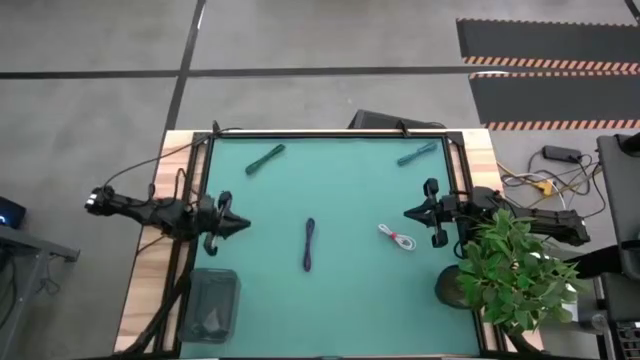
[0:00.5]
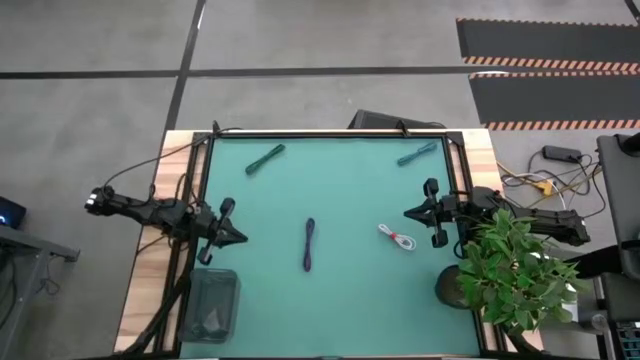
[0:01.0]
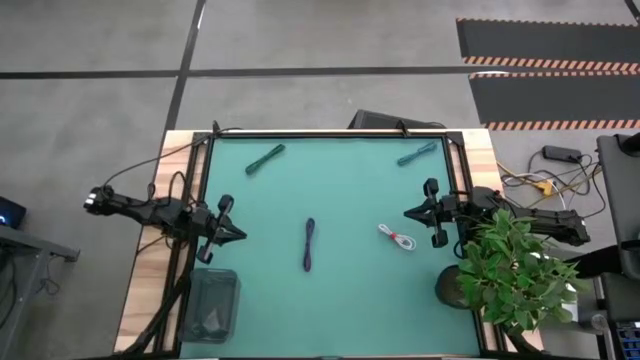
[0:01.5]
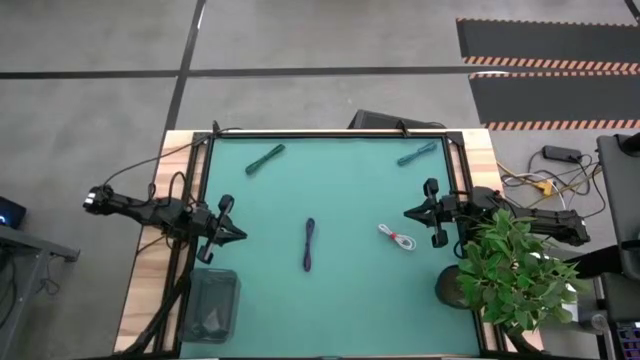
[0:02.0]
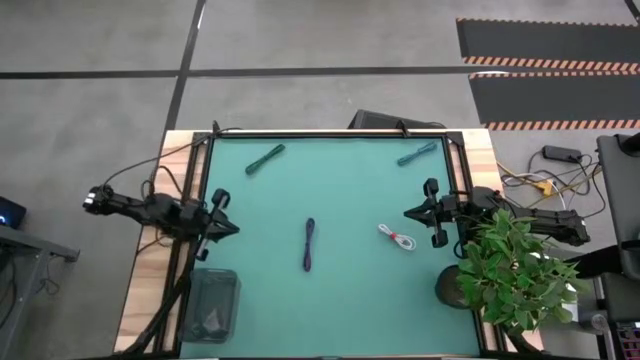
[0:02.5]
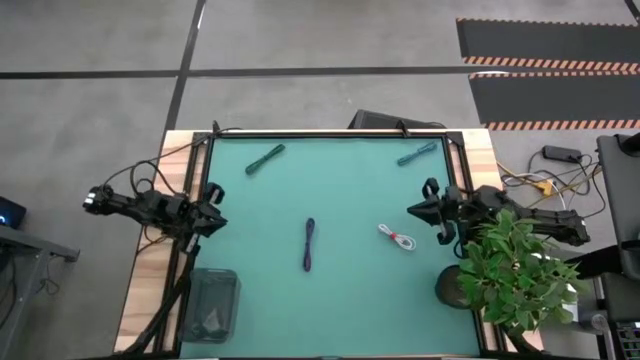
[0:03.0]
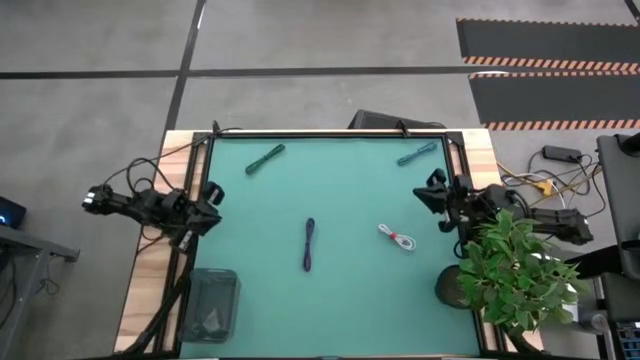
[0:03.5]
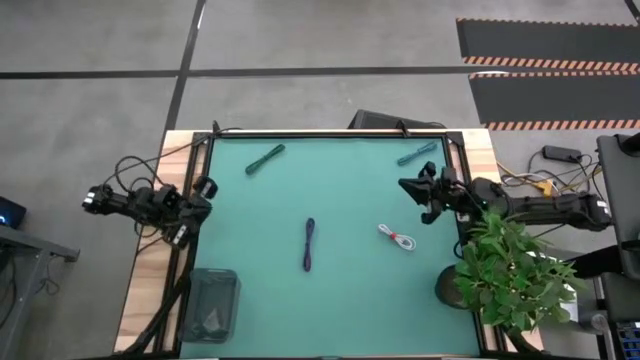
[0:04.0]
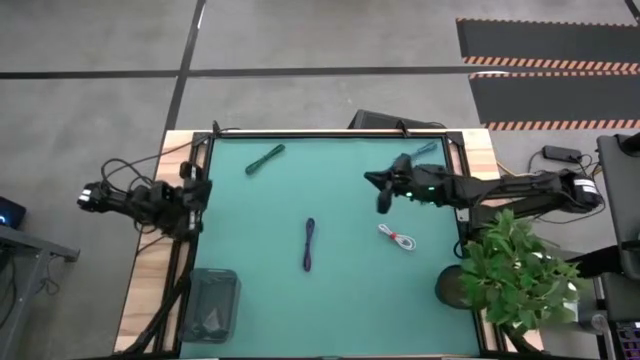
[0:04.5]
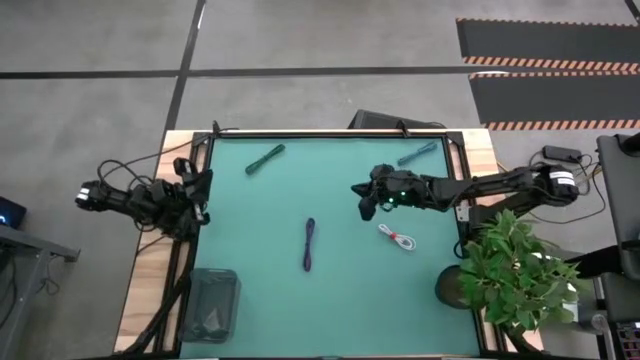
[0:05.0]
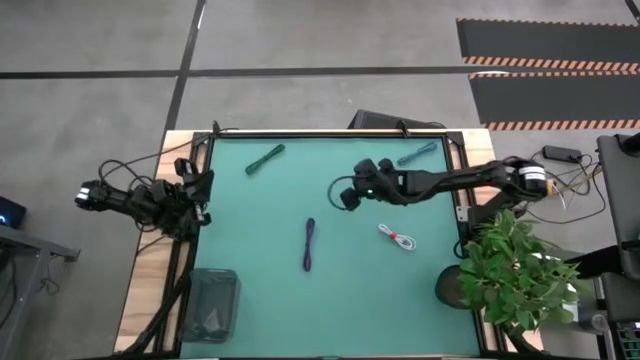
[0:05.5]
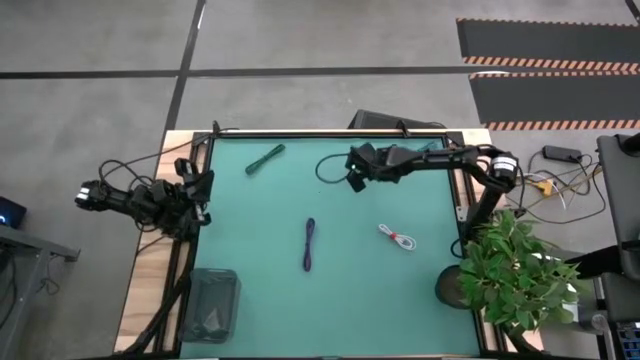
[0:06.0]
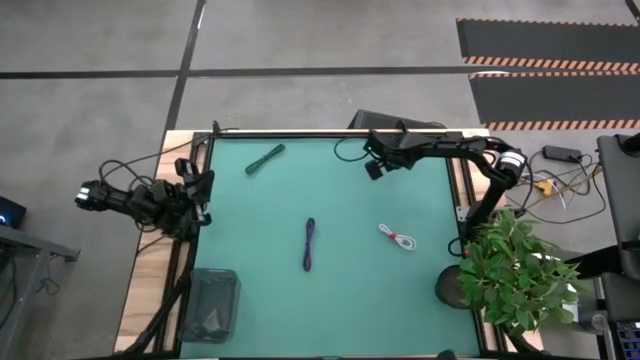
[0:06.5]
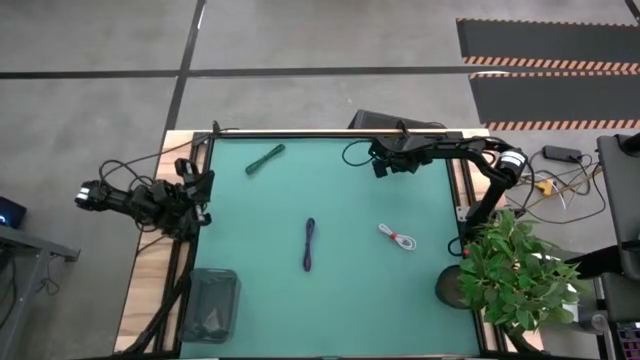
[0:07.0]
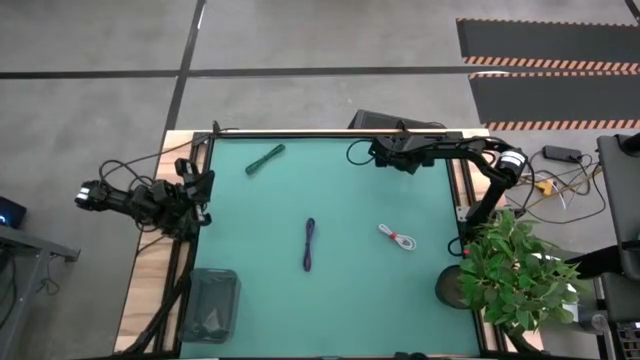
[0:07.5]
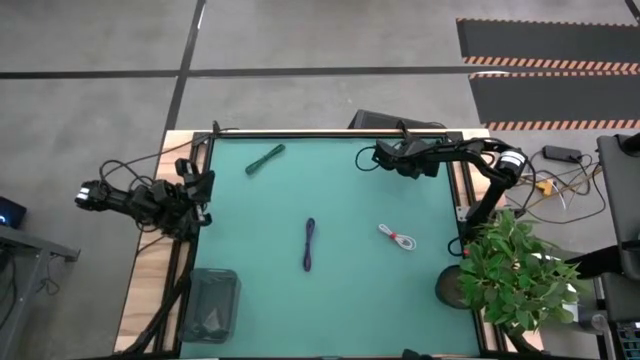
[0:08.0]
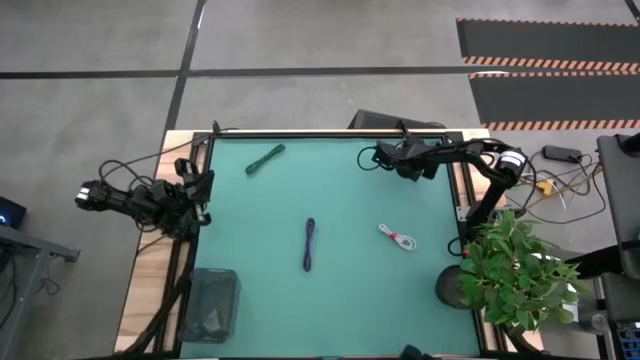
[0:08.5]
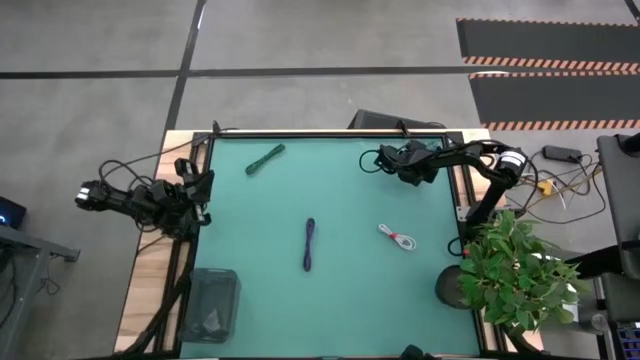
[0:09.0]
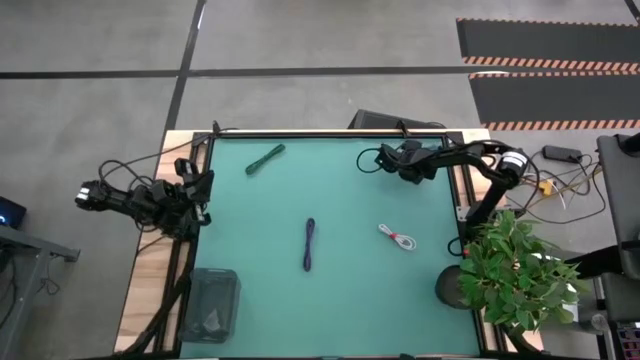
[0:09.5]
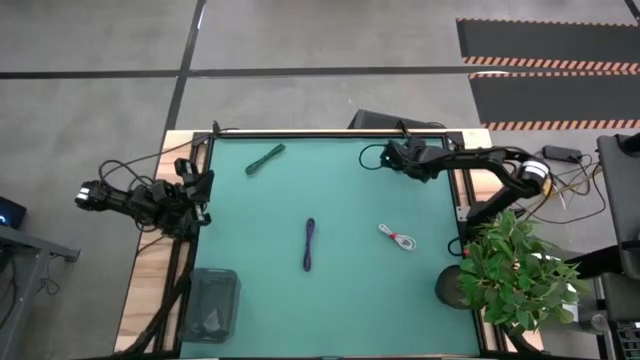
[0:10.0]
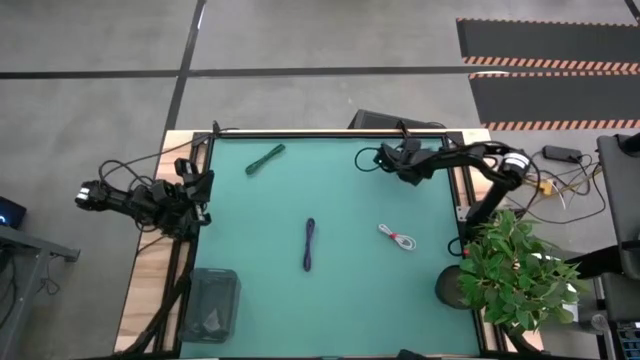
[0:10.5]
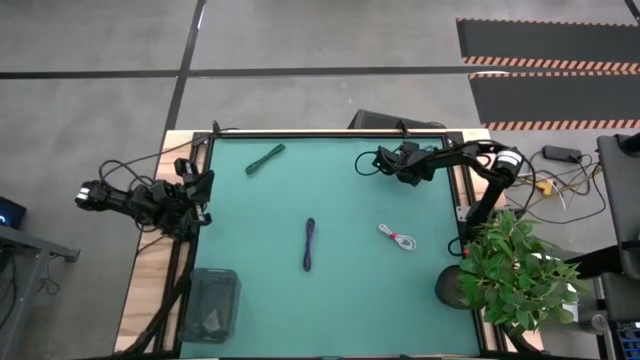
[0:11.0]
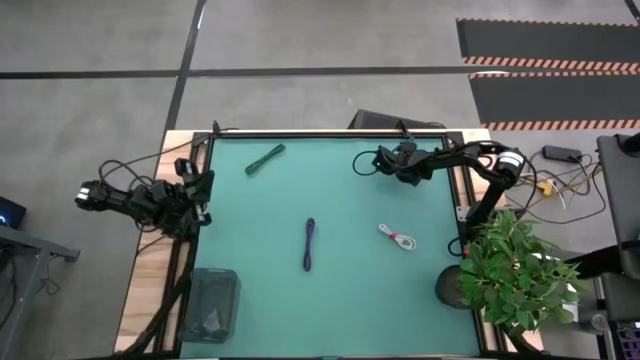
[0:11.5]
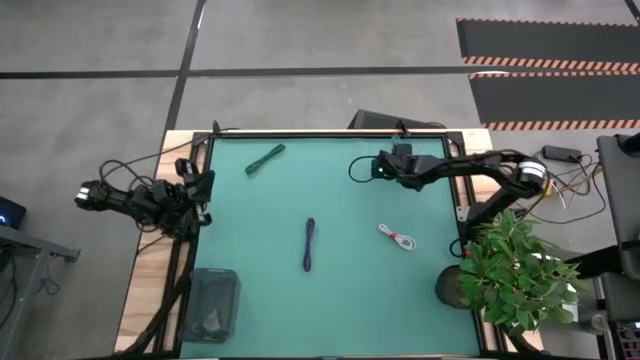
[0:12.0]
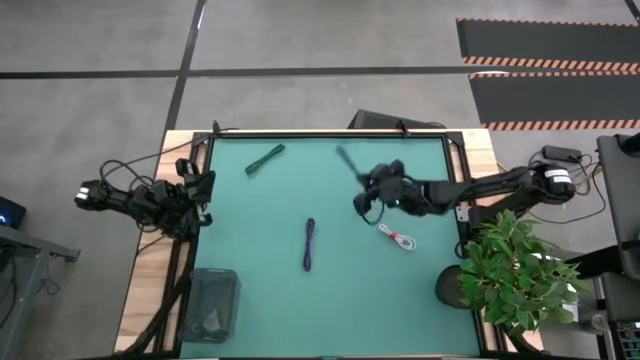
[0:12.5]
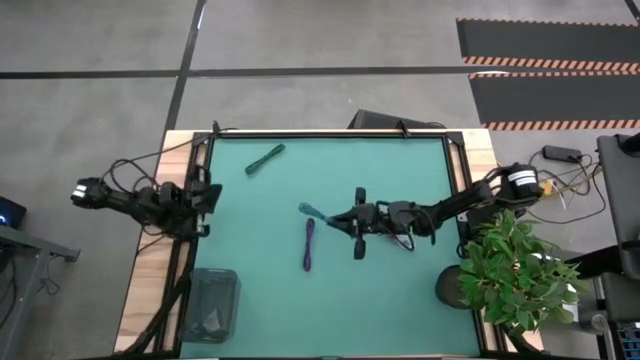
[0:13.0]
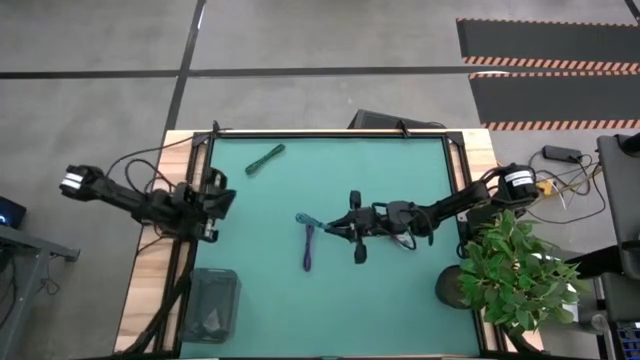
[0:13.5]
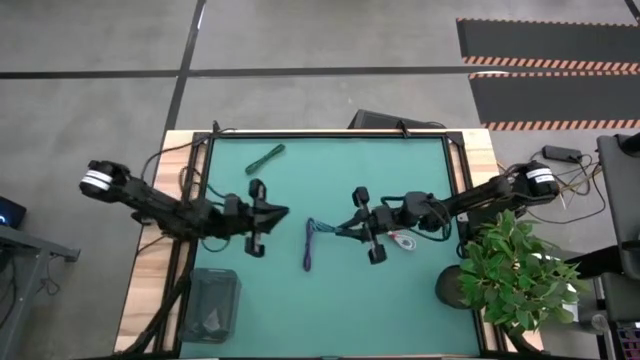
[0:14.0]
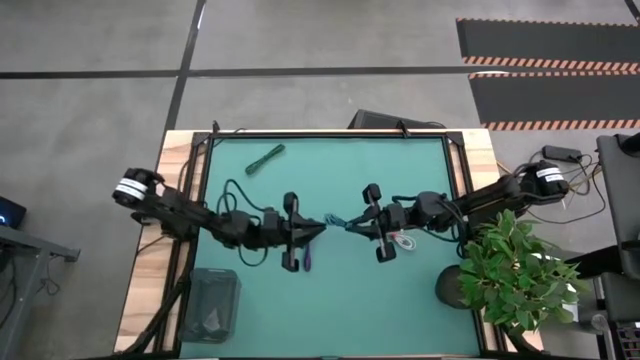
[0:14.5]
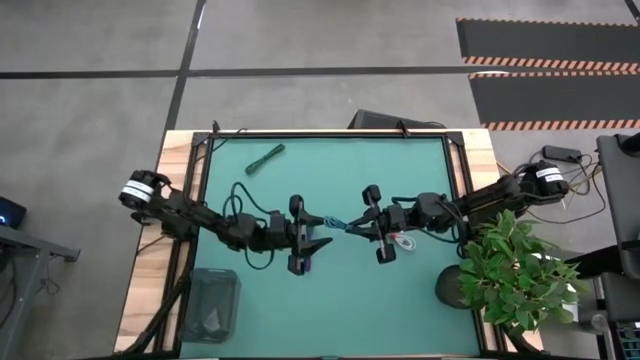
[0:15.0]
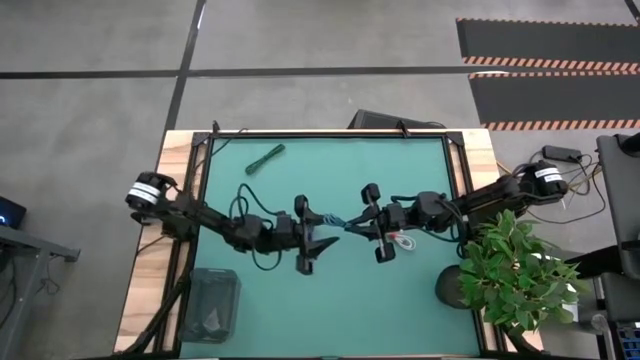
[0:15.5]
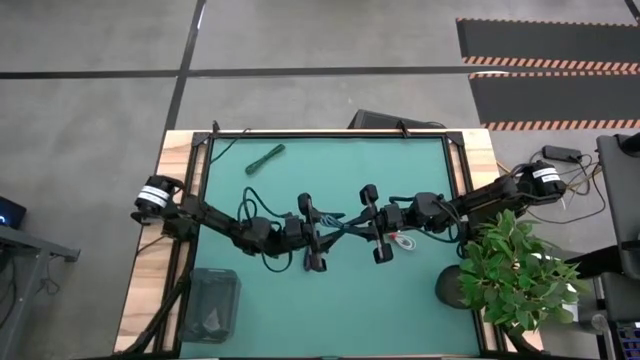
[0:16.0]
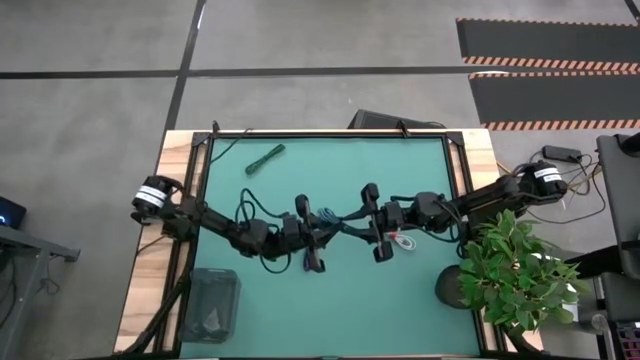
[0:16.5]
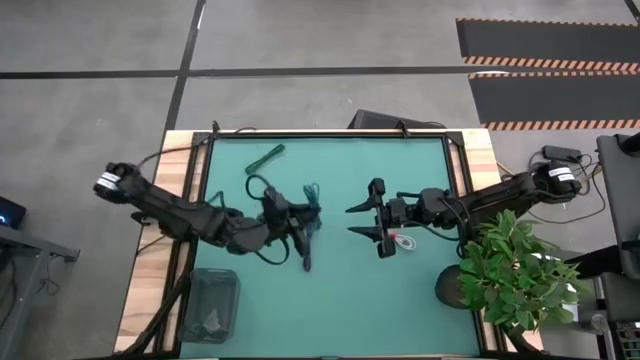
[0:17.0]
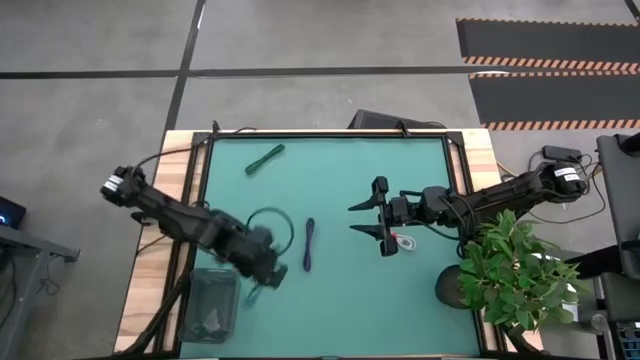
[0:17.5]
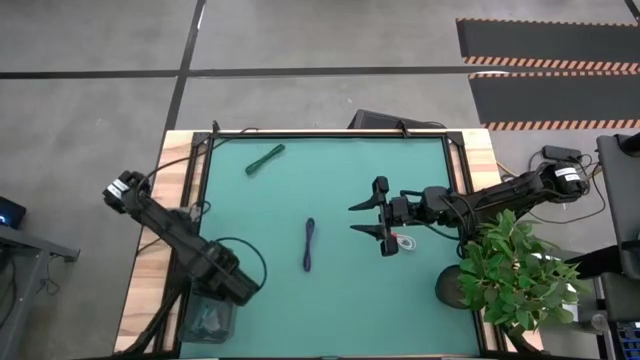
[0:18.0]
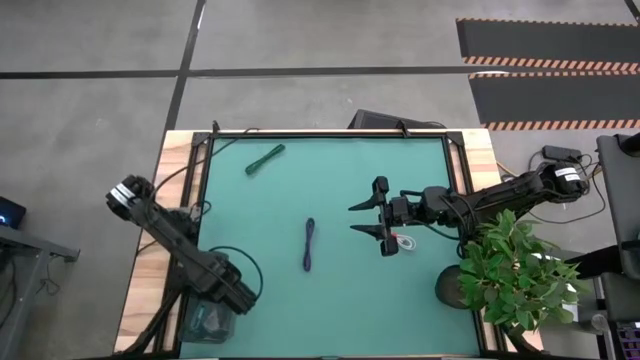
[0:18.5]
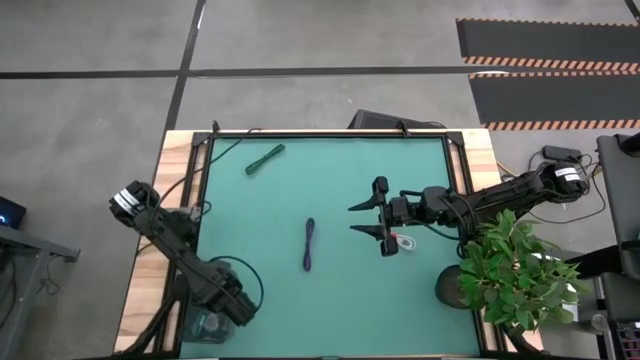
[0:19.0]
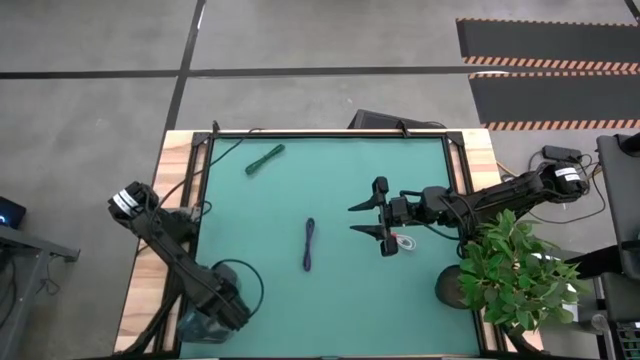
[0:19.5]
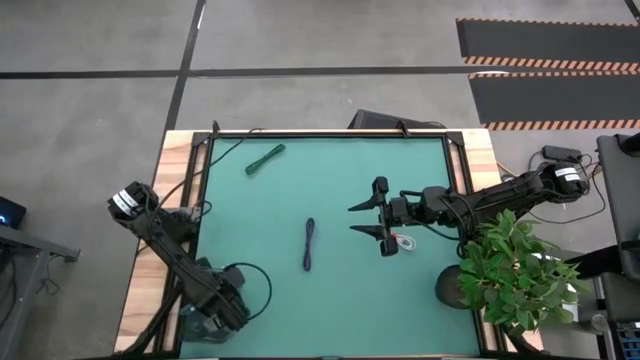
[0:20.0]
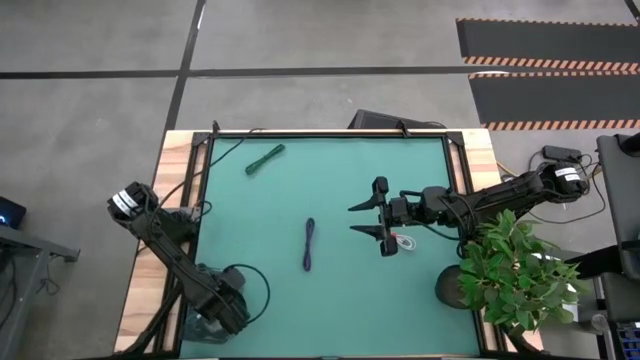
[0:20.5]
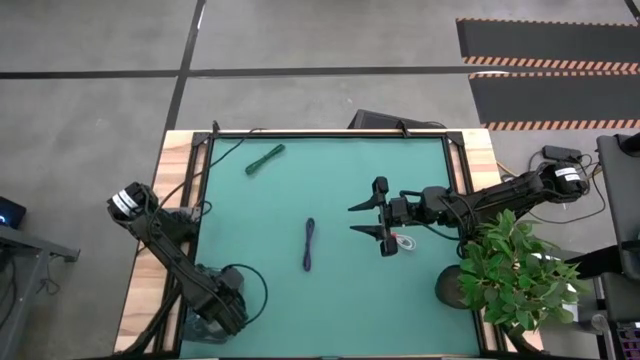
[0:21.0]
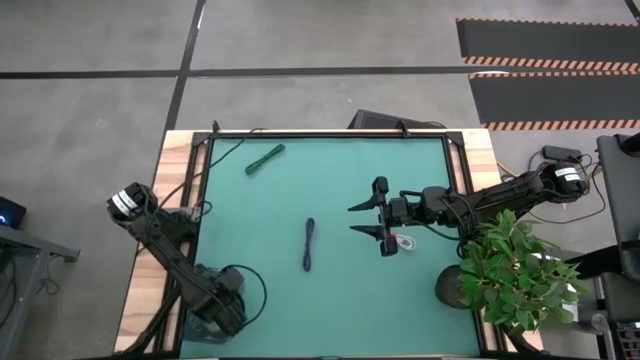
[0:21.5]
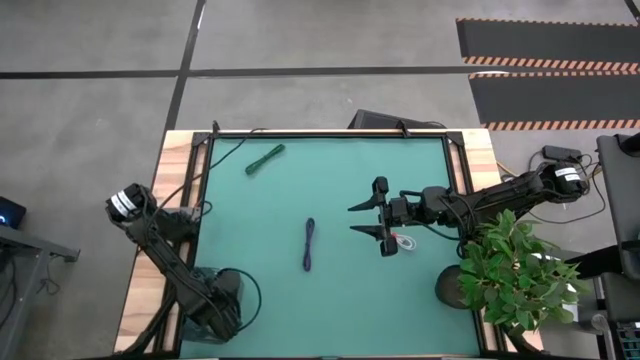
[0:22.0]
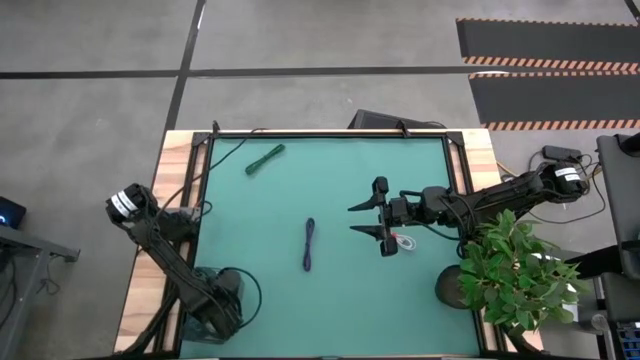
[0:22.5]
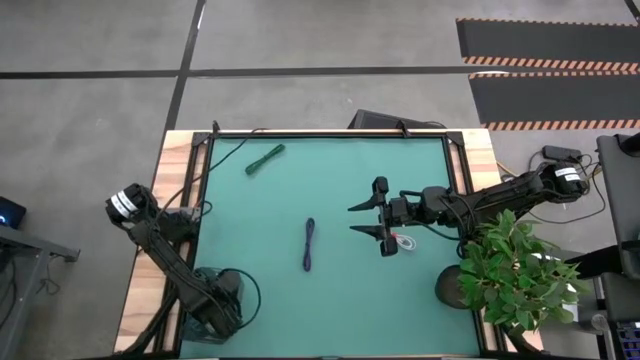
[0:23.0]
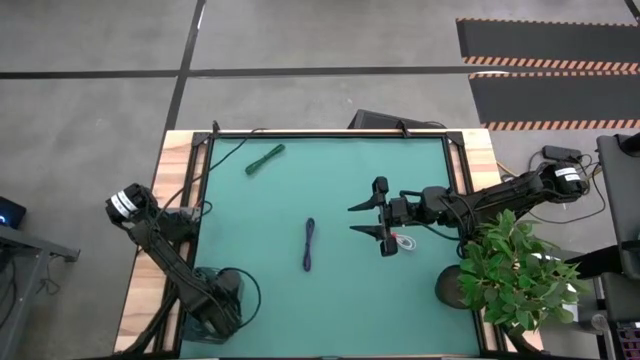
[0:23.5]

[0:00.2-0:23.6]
Task: Pick and place USB-C Cables
Put the blue charger cable into the gray bin
